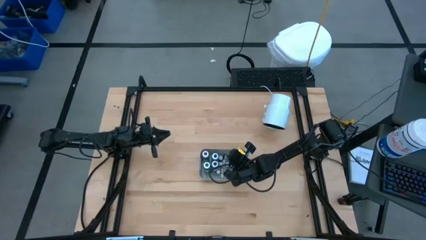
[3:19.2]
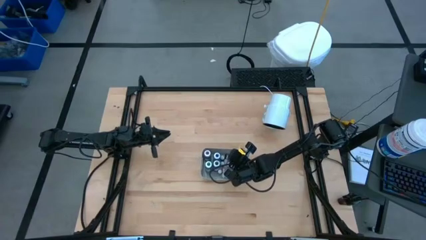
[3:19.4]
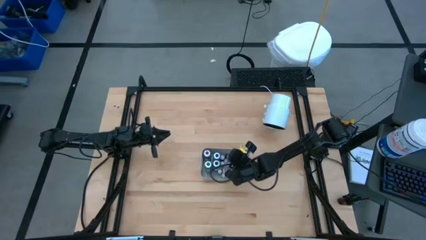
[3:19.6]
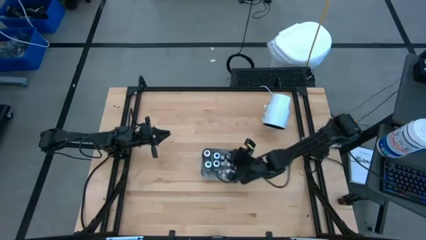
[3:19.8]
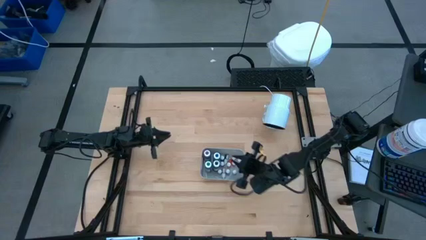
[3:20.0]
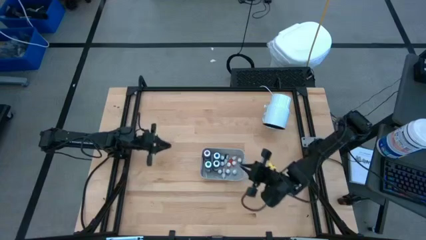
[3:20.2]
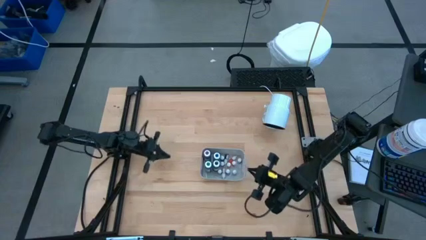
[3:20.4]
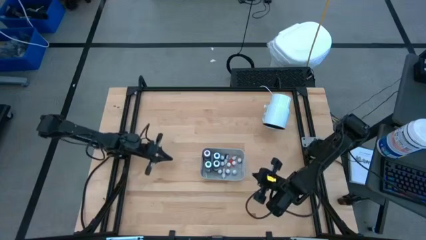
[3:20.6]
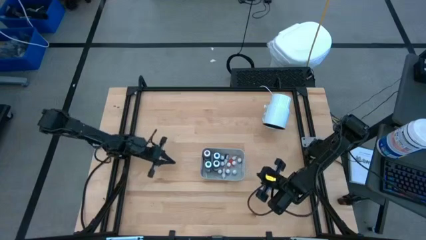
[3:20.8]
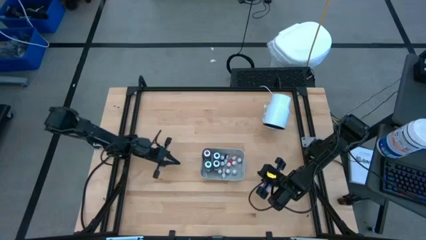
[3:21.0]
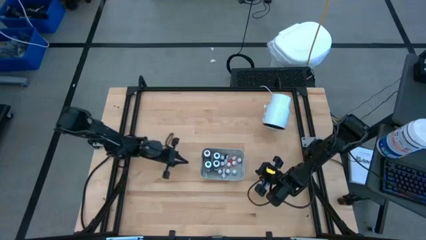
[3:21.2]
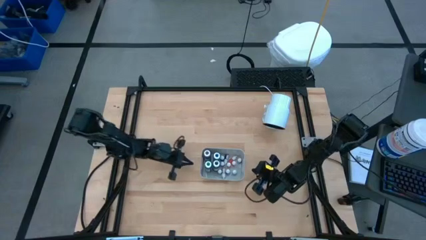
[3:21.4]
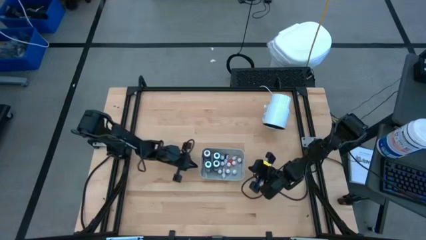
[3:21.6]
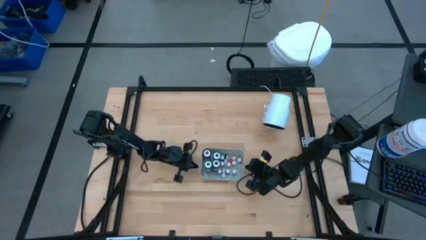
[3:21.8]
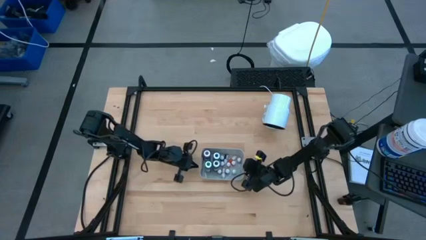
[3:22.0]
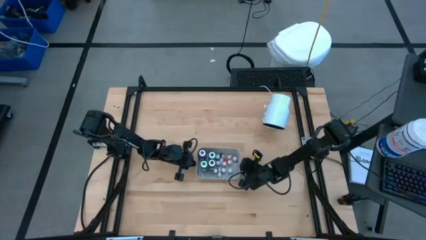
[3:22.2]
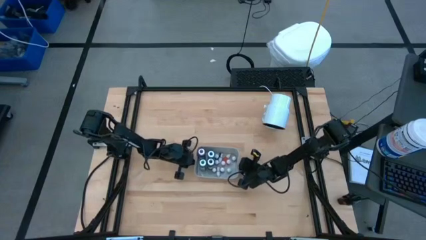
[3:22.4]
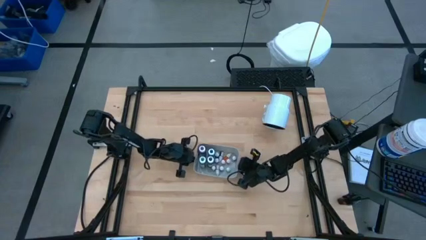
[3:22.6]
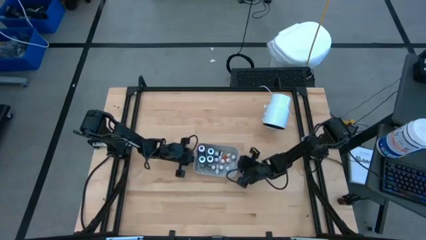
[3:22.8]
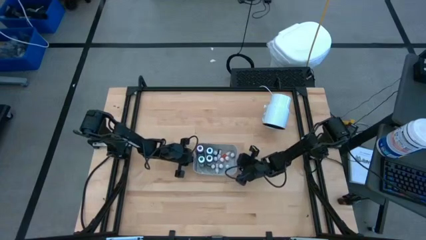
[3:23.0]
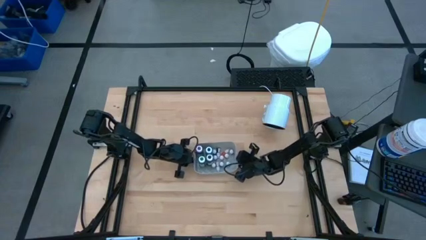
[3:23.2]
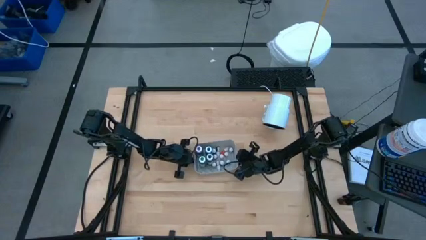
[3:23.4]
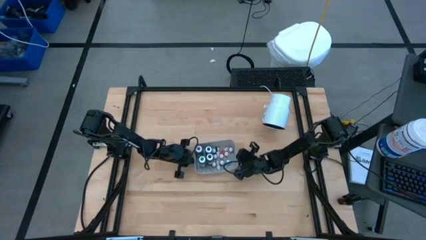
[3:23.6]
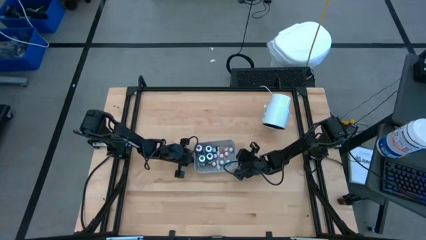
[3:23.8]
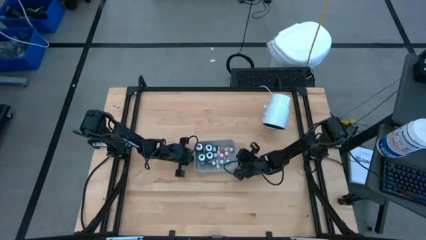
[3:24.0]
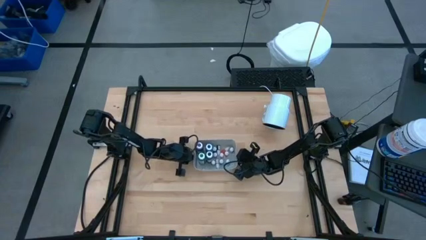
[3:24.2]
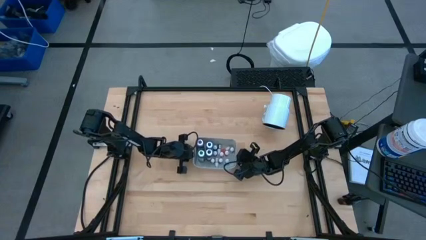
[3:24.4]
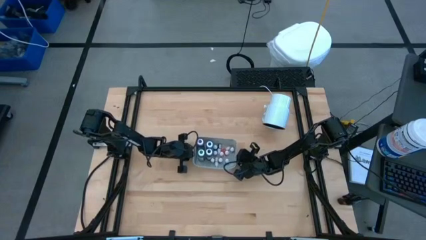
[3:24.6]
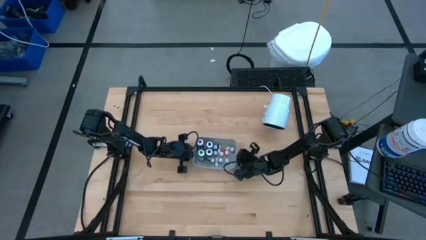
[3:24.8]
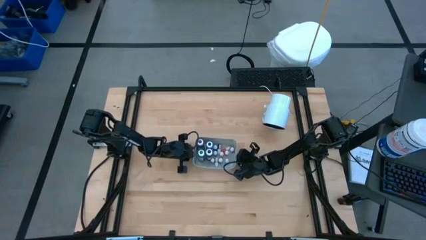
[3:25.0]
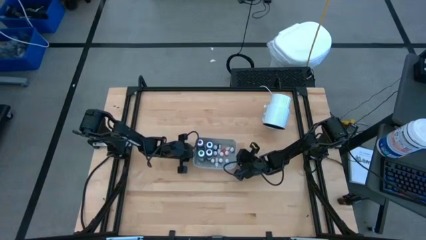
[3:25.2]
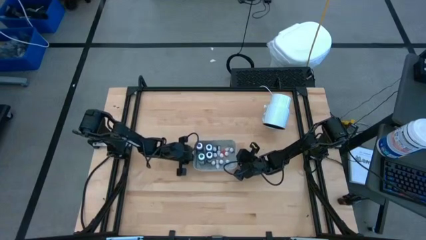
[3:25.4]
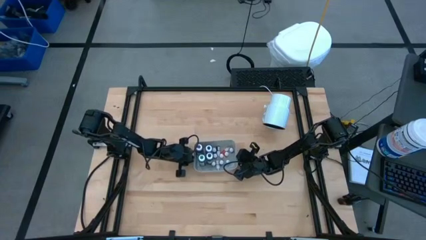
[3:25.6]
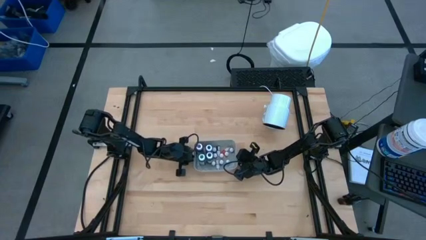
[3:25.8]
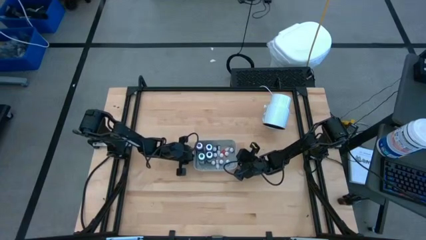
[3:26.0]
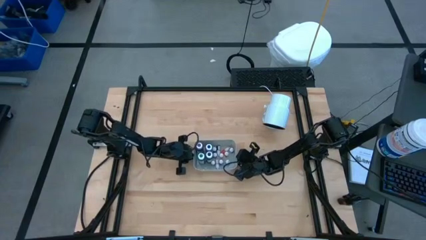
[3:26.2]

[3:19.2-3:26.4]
Task: Pick & Place food coloring
Adjust the gray bin

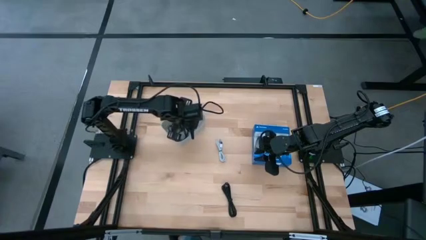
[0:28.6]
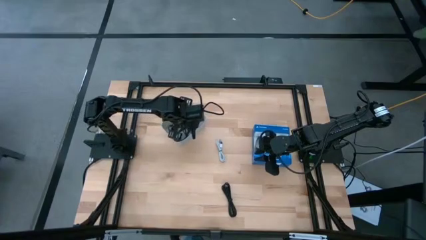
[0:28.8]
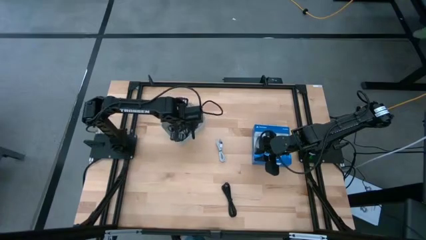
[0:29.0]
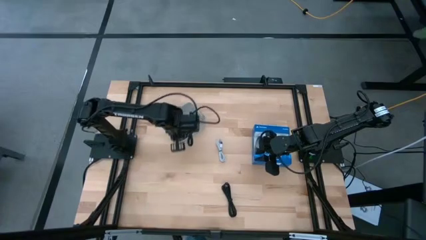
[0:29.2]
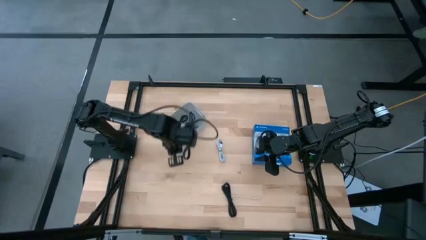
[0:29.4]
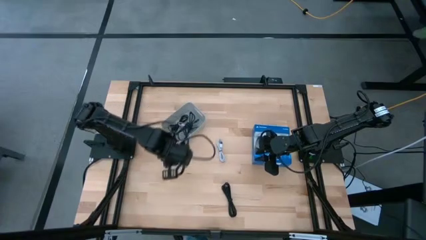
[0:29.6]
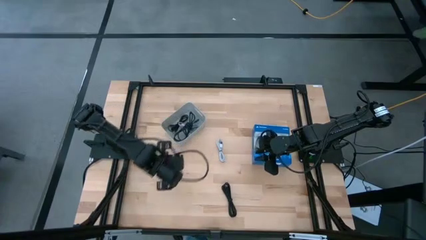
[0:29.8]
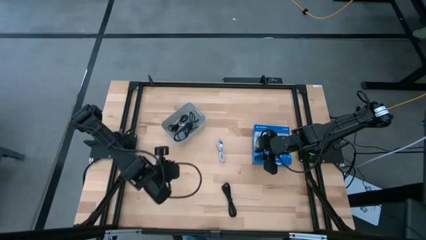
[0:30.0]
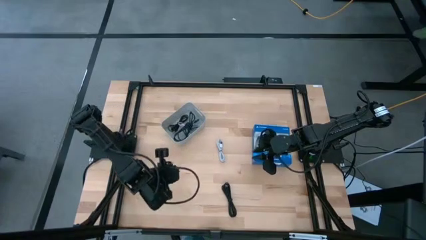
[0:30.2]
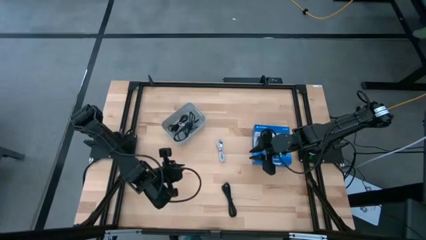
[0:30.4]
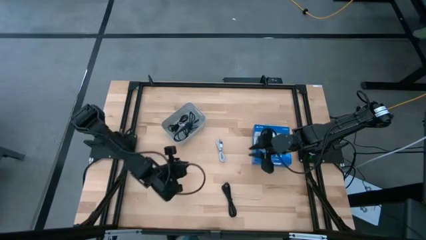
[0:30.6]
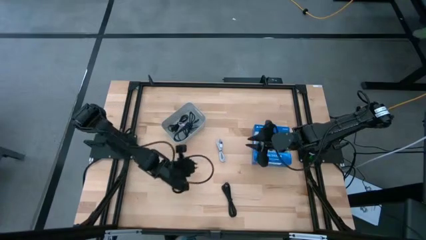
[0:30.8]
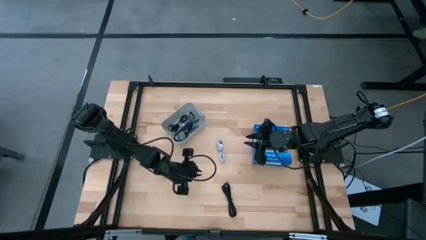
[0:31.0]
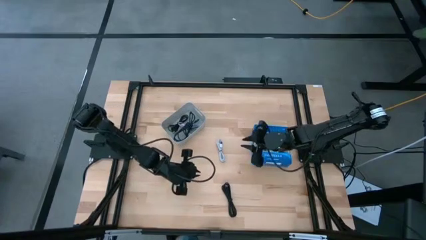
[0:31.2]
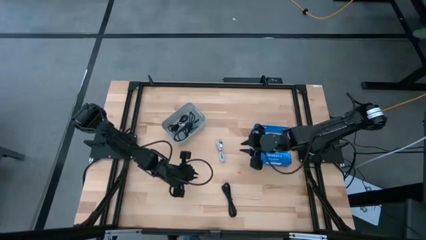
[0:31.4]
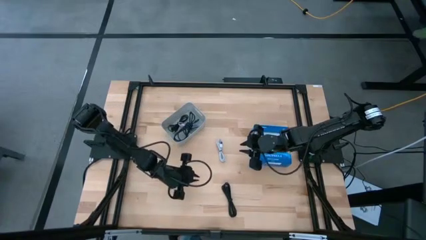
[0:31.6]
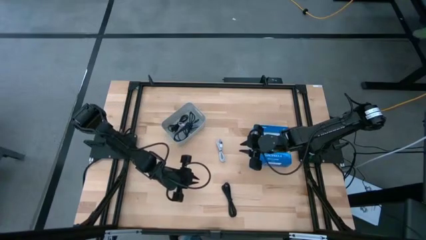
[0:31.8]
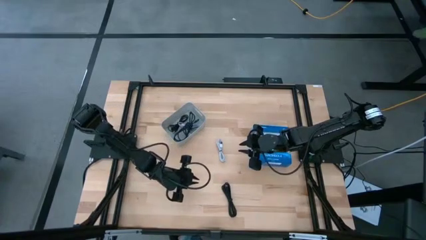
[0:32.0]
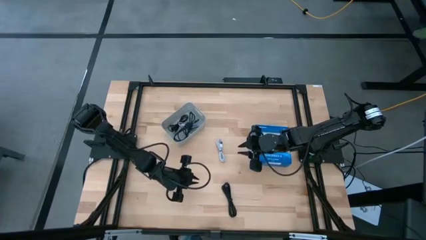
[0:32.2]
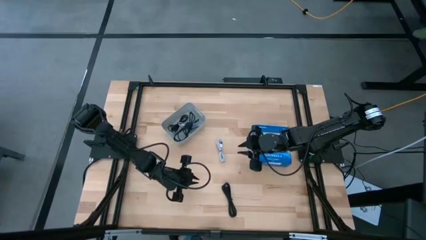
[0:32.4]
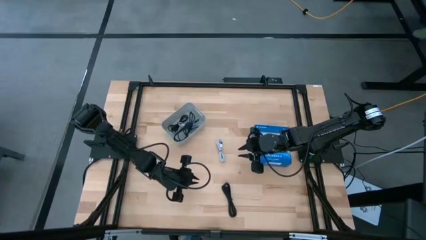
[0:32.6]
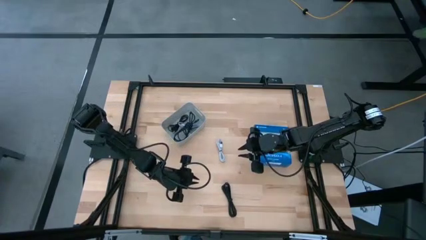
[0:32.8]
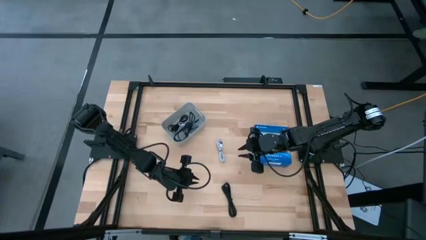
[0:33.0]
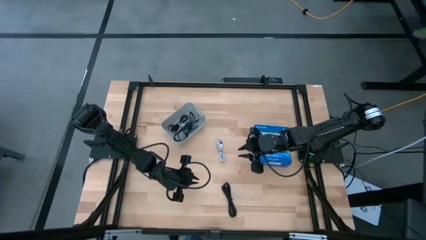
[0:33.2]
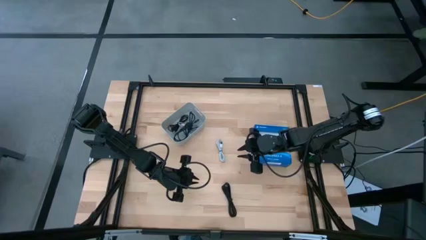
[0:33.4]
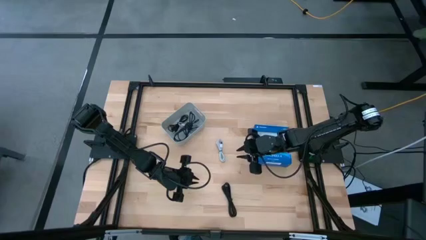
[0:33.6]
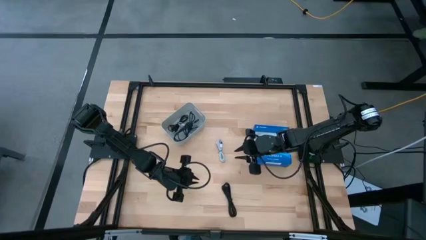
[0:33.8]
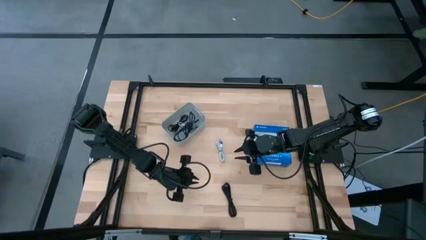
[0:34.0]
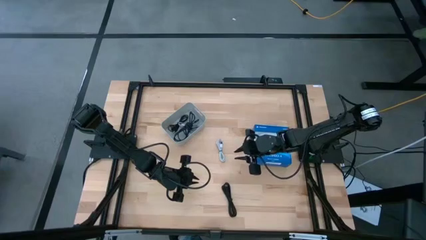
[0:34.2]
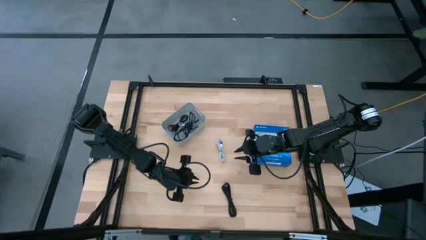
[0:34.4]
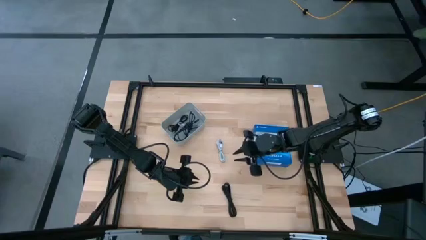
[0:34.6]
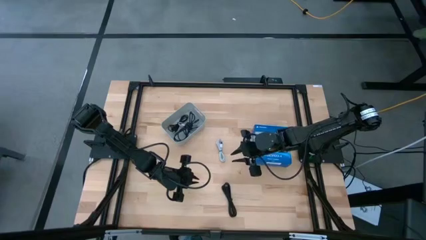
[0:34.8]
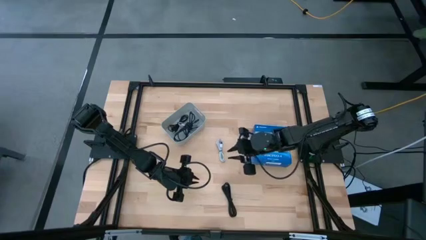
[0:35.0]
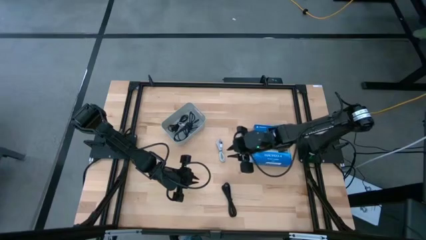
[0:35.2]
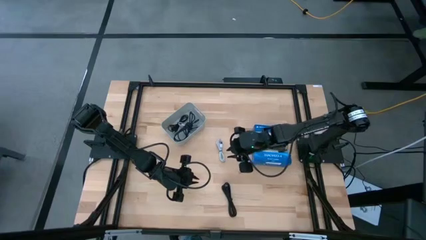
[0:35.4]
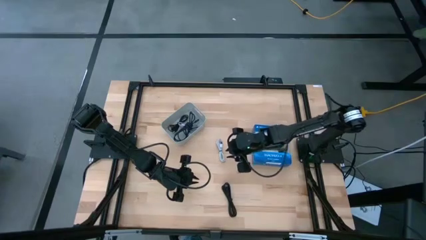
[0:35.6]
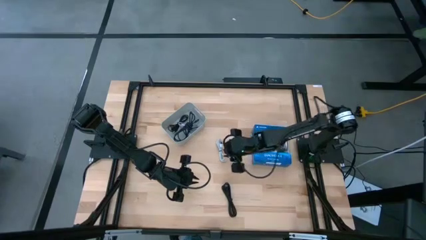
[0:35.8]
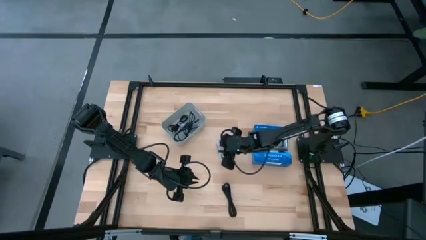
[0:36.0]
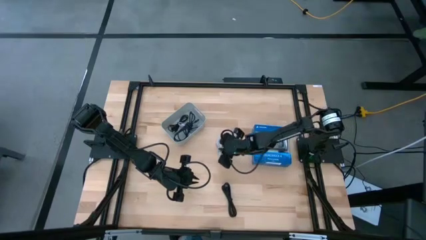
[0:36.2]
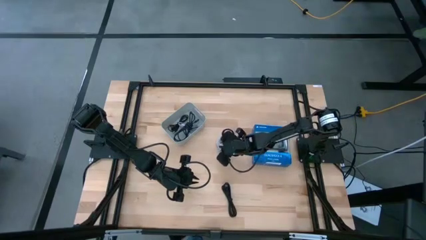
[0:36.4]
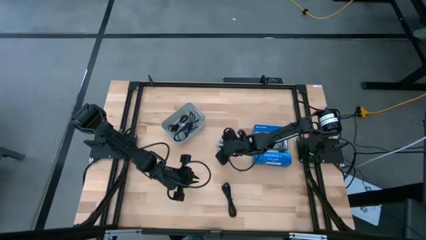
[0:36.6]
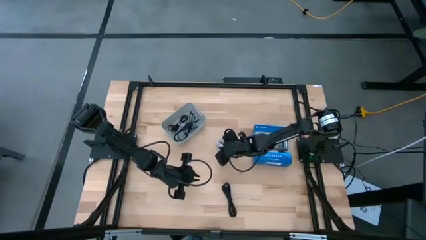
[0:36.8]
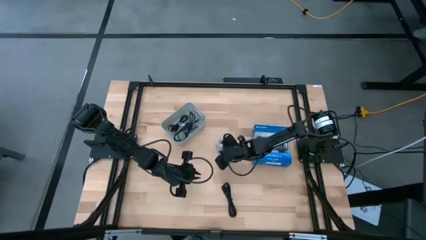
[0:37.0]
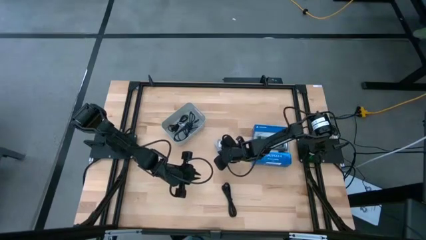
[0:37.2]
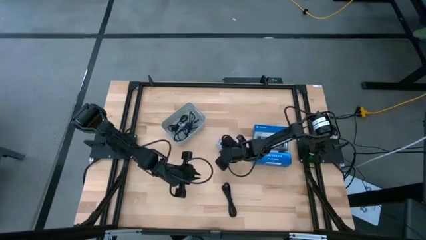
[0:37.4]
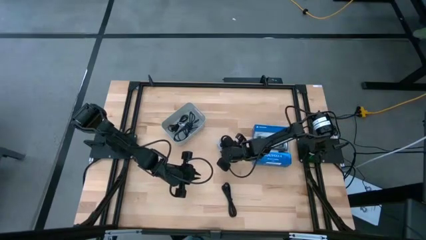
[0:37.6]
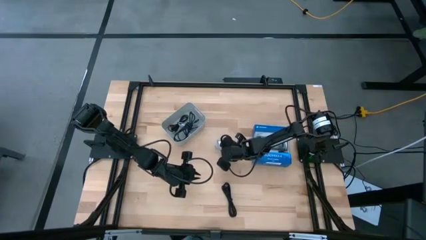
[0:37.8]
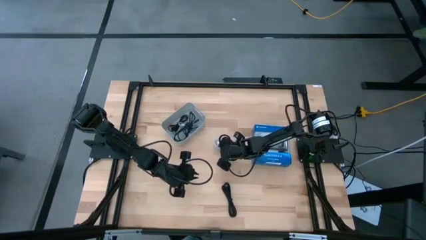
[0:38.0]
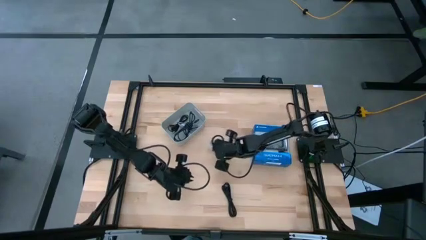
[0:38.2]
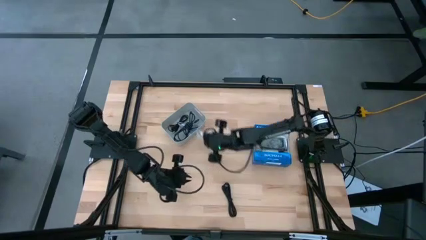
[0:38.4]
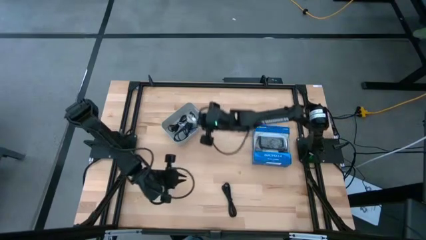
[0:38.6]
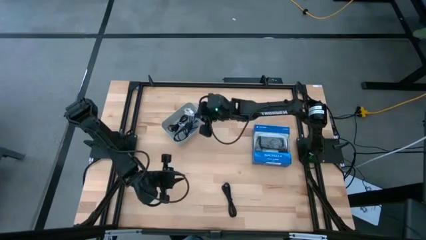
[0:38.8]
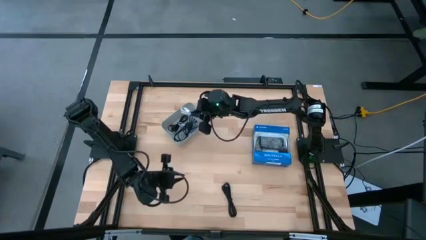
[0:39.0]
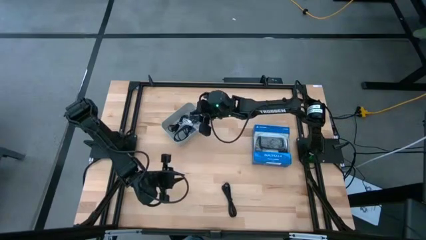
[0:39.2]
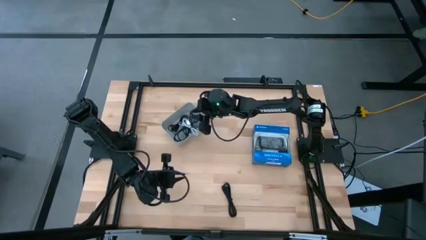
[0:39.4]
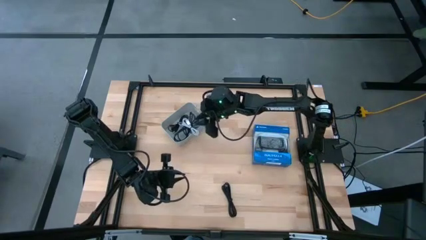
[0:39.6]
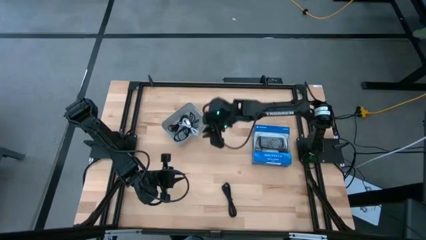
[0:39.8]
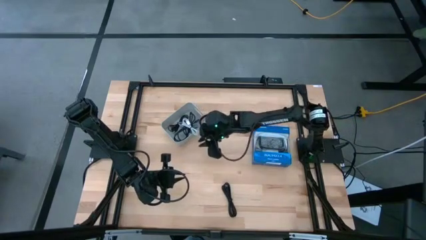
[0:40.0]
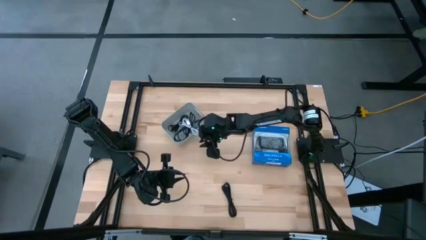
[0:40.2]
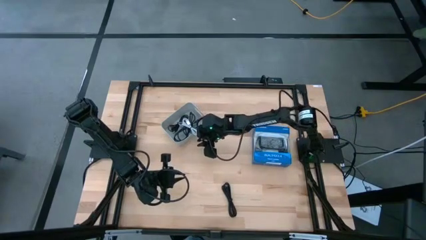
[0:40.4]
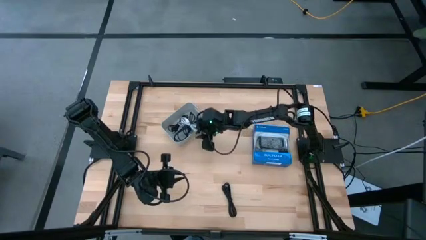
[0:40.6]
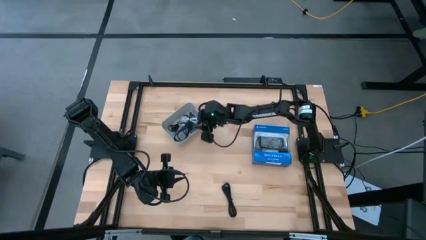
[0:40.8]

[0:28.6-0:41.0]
Task: Pick and place USB-C Cables
Put the white charger cable into the white bin
